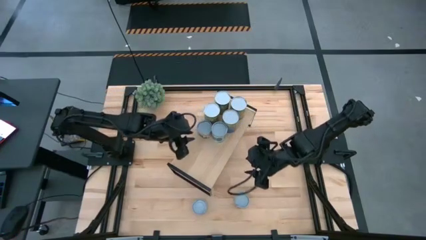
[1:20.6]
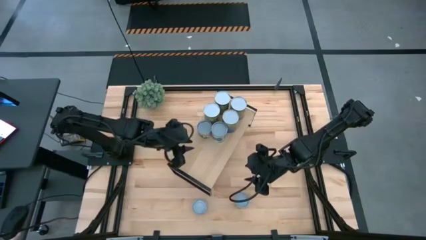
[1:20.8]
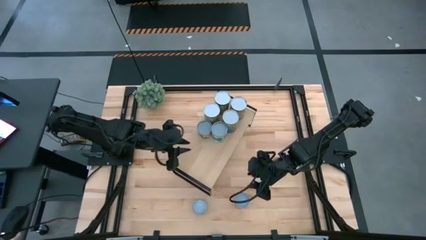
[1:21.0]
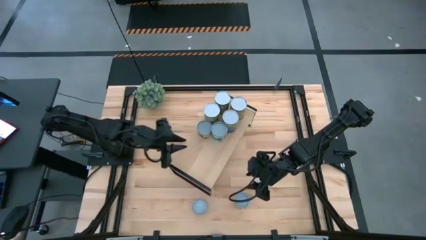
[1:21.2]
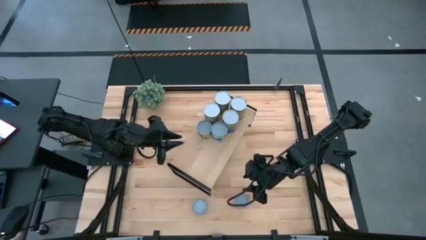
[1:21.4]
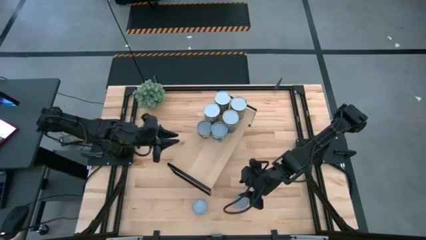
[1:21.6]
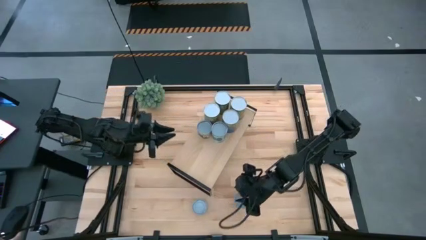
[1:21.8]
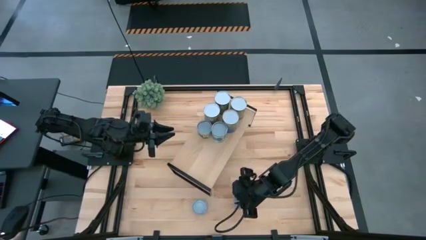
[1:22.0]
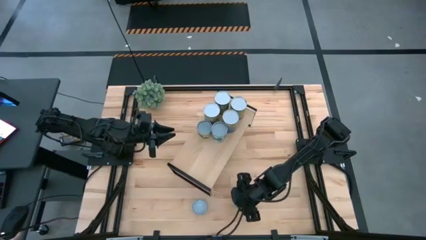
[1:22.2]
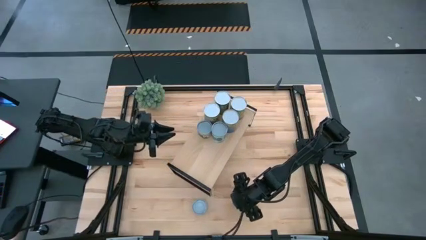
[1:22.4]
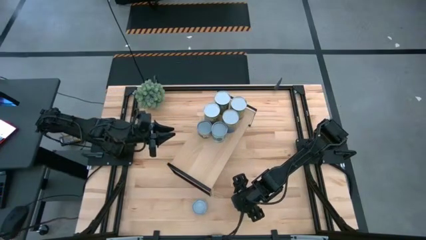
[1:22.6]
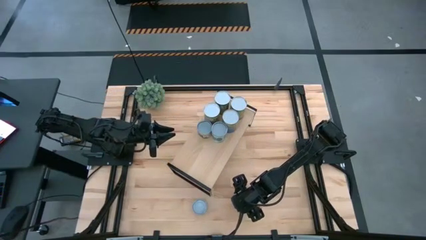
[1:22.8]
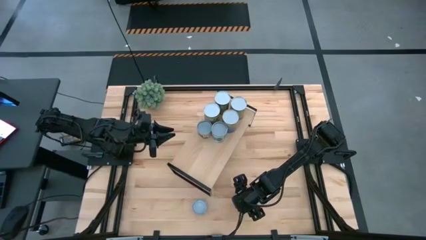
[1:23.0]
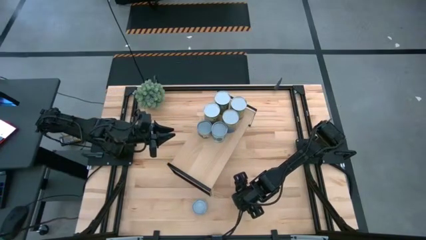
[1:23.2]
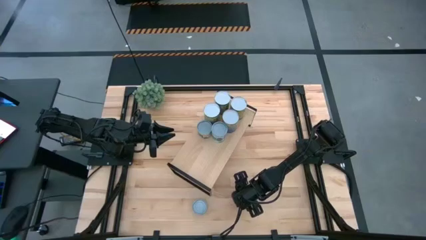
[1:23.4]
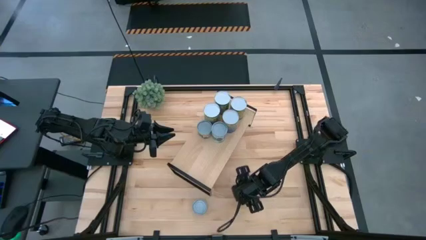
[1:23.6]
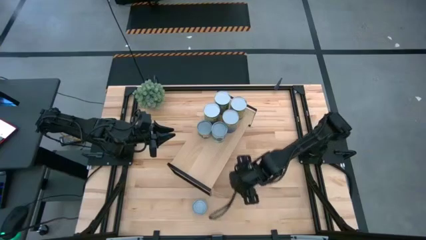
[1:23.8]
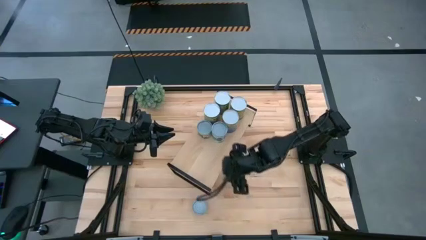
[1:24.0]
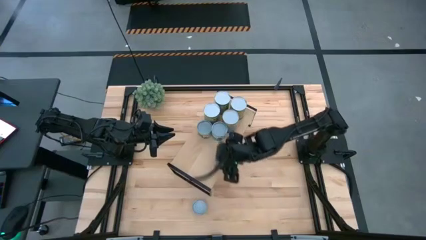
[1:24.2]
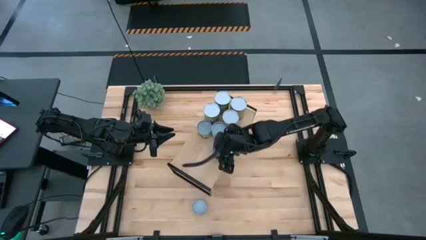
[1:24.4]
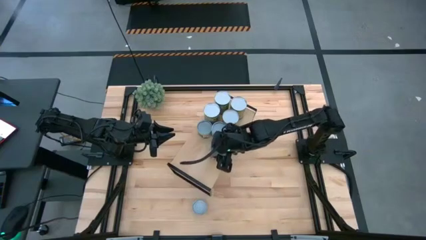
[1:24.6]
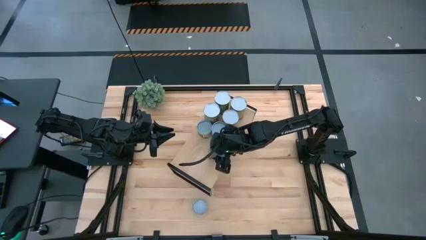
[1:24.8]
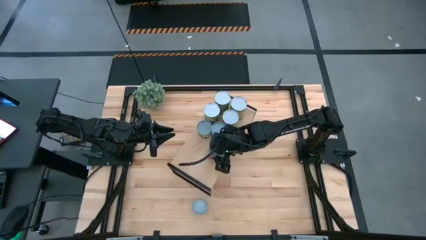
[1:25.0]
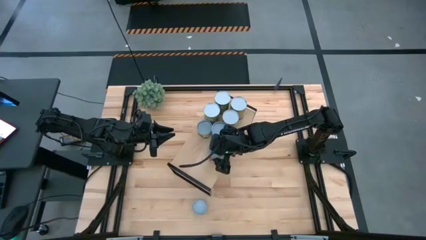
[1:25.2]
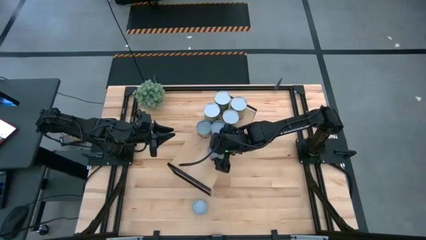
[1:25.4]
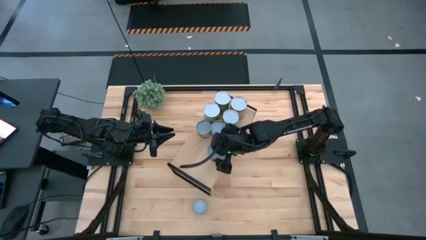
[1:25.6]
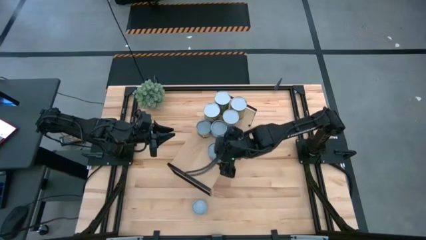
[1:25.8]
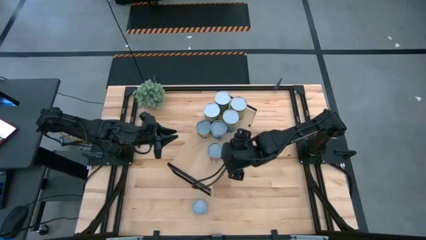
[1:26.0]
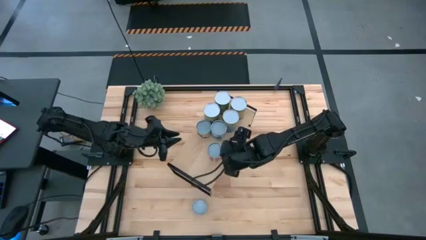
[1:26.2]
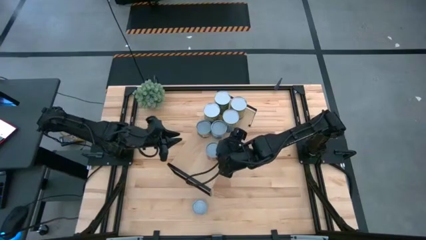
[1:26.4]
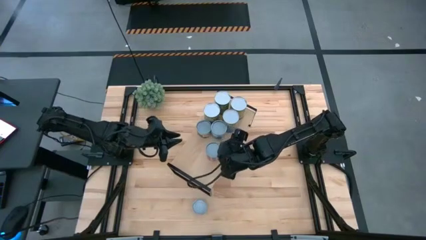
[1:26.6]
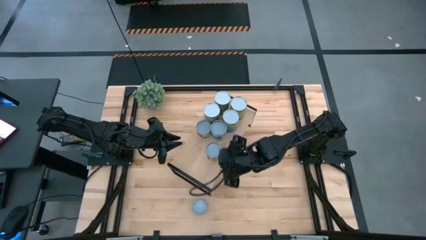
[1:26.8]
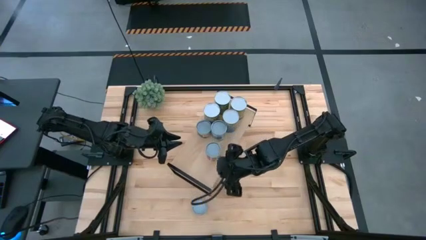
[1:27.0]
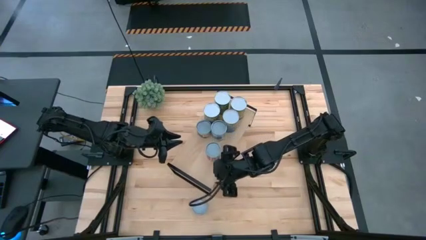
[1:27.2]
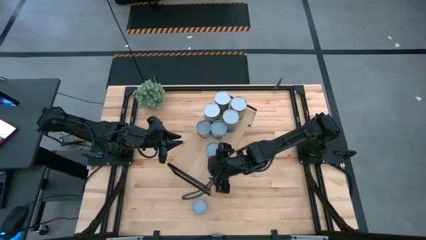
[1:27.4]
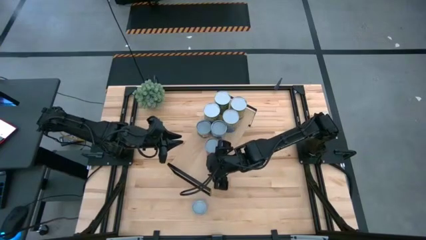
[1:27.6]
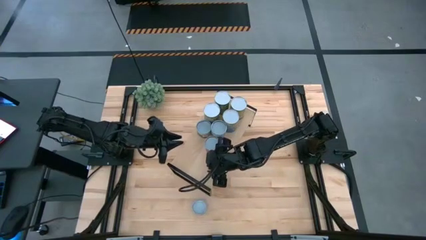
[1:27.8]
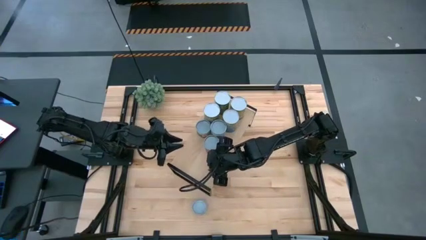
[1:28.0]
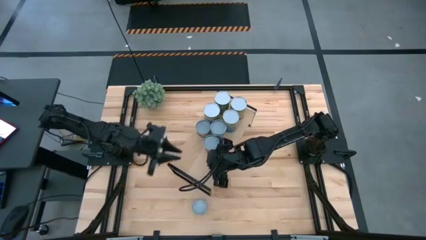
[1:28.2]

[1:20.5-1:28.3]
Task: Pick and place cans onto a shelf
Put the canned mixed tomatoes on the shelf

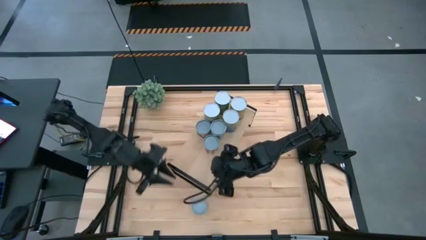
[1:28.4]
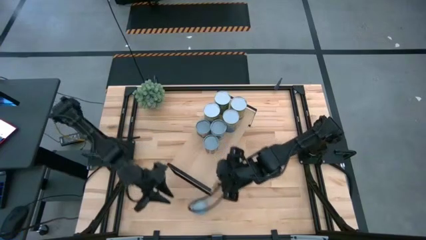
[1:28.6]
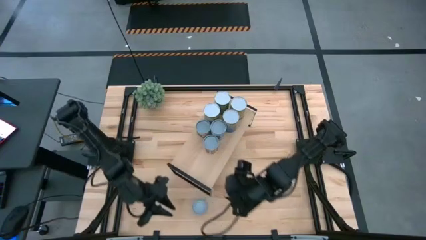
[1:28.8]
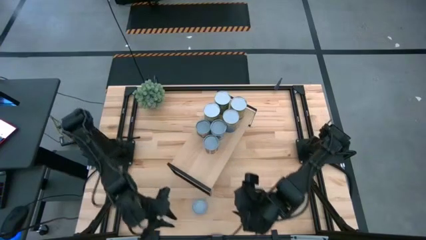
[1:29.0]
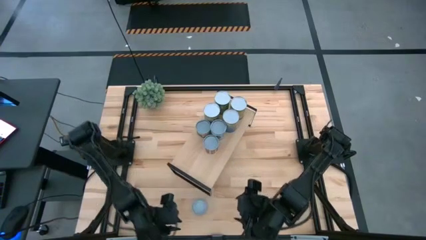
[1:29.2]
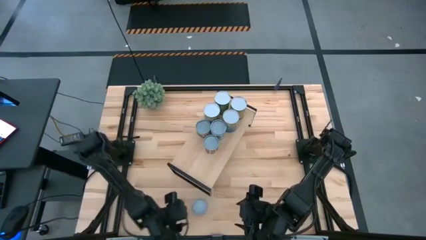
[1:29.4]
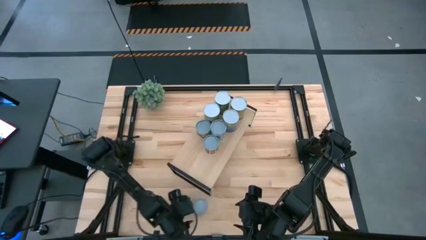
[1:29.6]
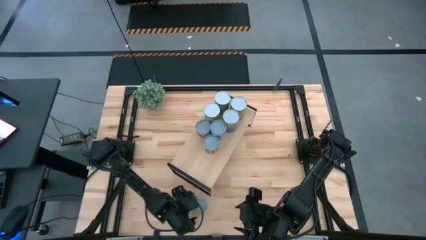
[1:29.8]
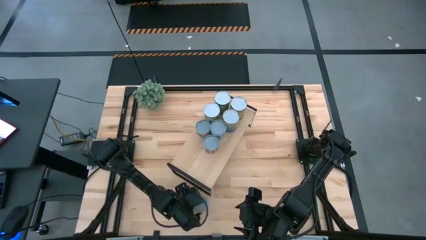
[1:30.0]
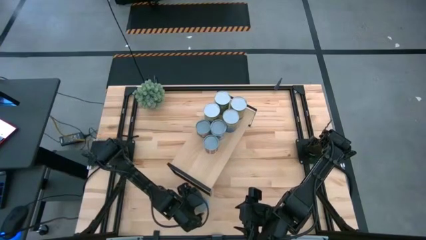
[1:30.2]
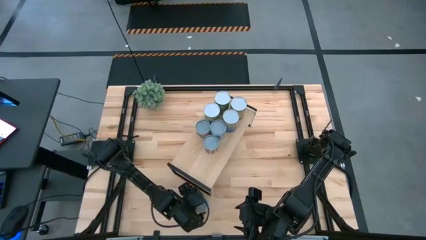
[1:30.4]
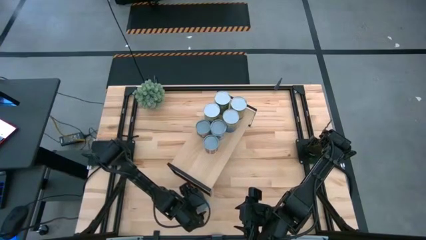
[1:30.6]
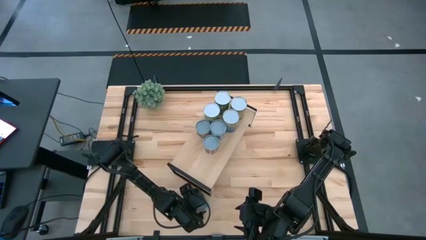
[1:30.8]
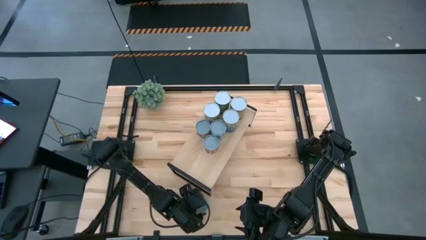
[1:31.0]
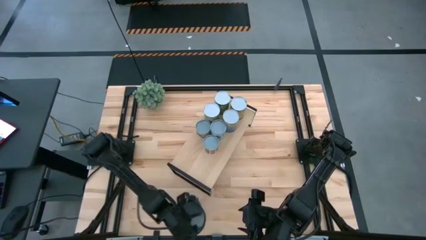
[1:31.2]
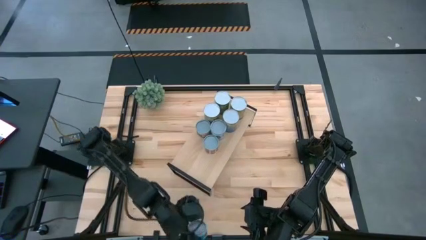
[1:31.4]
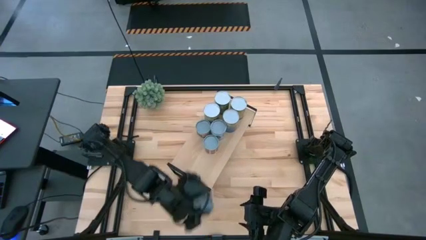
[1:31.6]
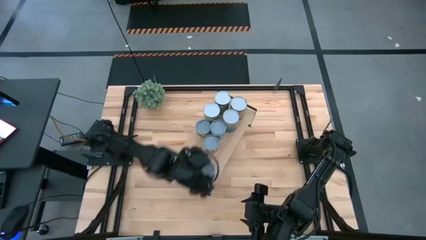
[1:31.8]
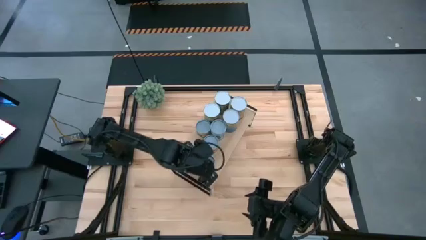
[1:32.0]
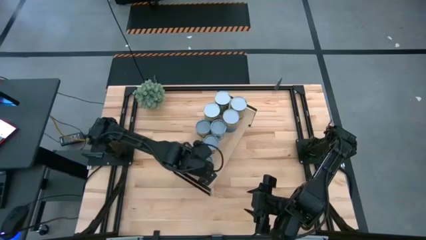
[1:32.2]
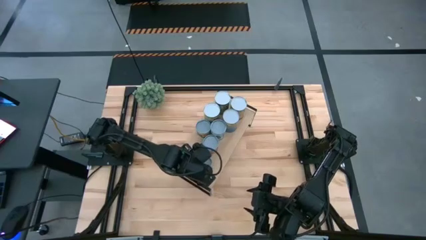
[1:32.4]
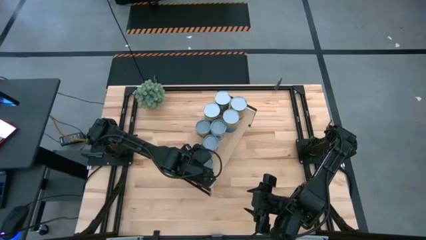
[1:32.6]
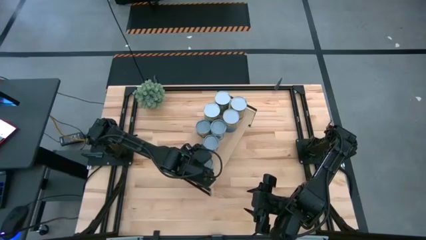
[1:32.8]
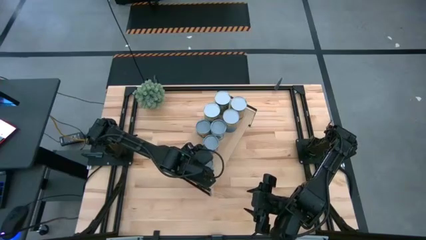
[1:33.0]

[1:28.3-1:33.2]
Put the canned tuna on the shelf

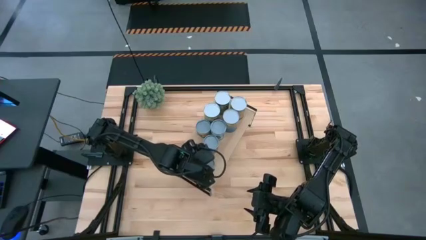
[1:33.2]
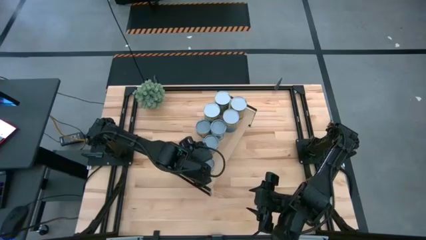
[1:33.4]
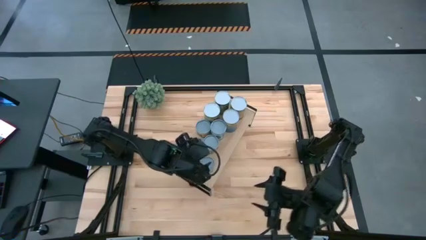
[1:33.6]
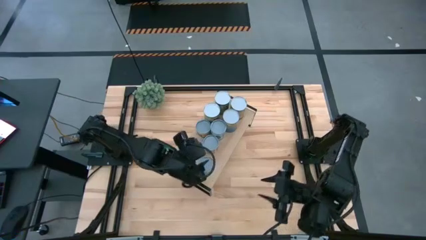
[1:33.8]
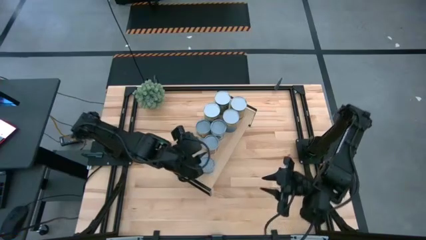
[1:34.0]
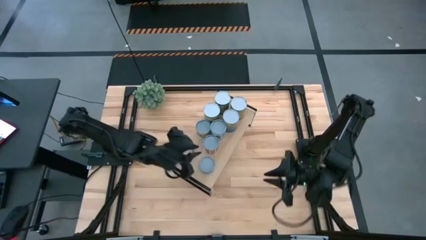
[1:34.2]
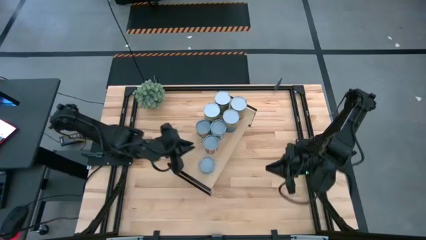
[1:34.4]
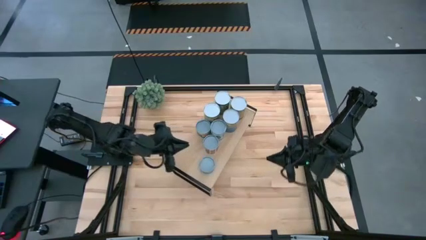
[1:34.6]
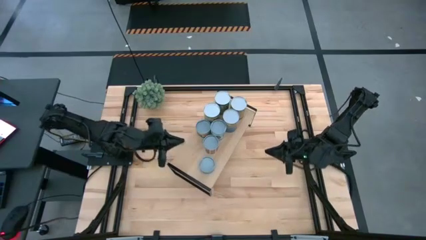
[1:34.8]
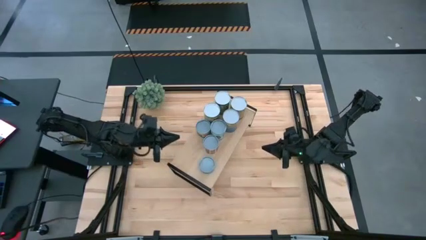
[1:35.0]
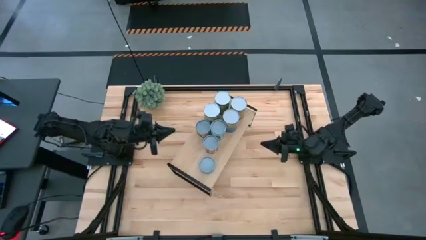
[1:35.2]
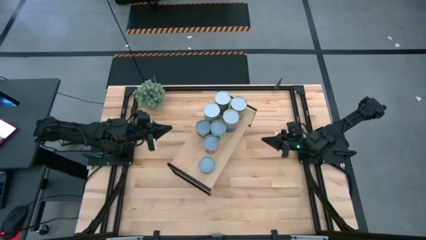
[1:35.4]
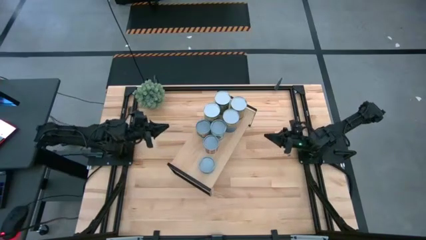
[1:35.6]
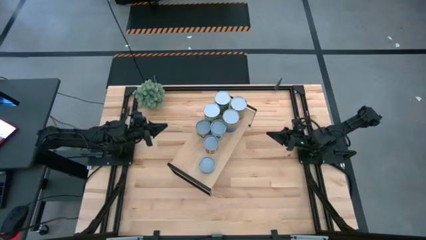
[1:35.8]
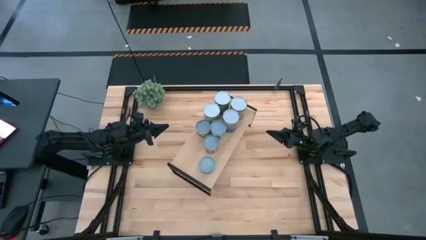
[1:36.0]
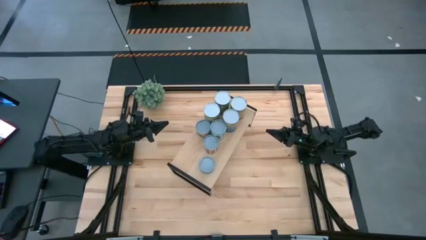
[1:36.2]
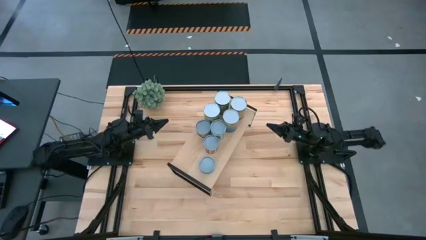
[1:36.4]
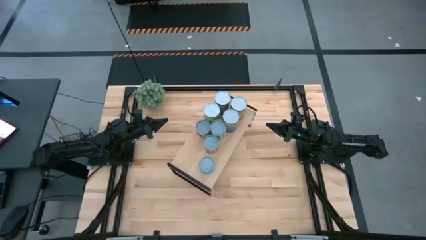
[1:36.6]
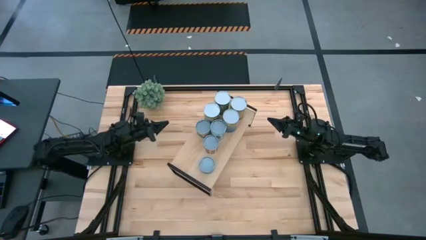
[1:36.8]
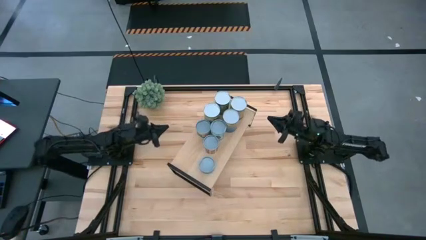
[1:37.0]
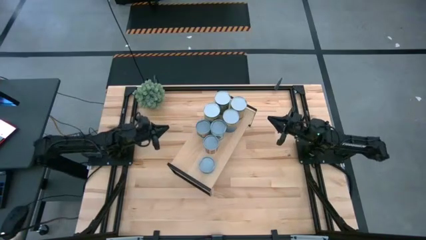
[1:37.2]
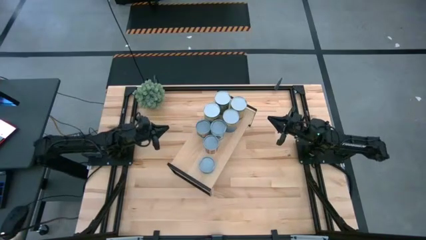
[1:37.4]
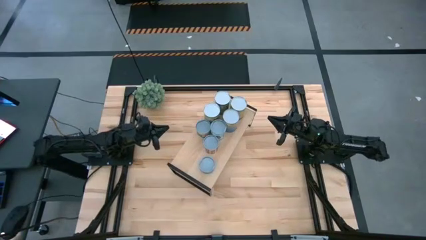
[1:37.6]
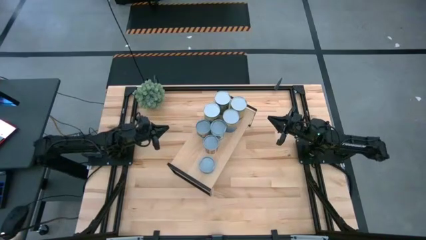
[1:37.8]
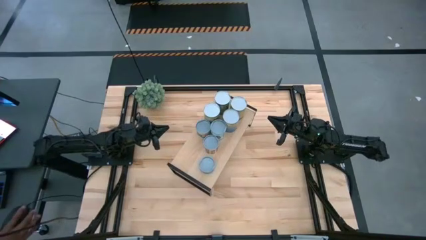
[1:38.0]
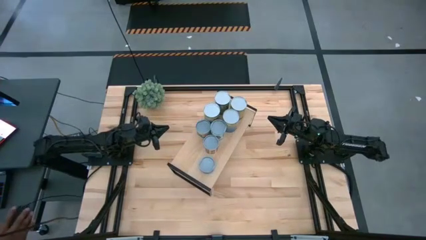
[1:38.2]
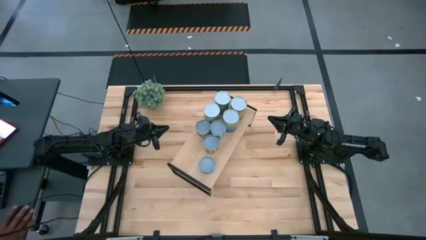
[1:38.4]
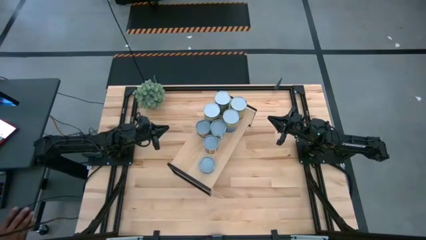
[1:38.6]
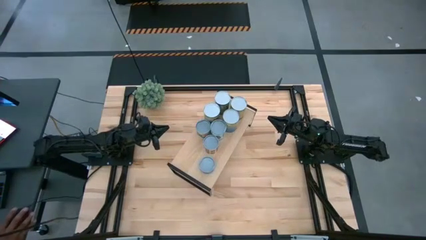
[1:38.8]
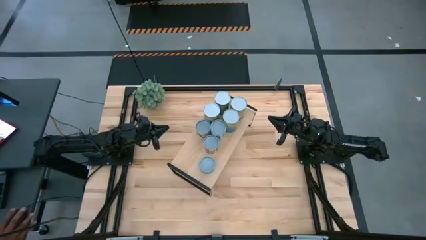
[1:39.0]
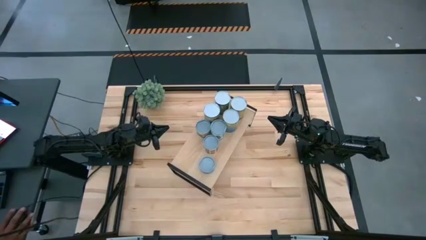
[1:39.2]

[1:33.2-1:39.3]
Return to Home Position
